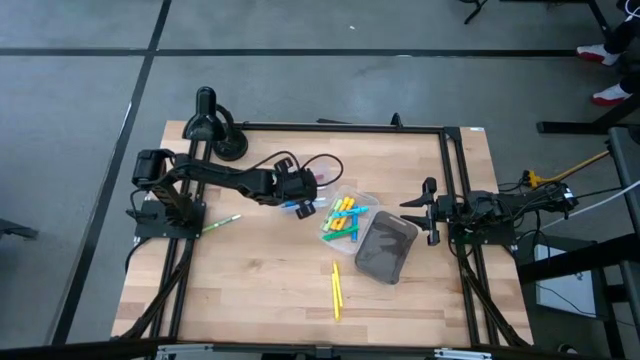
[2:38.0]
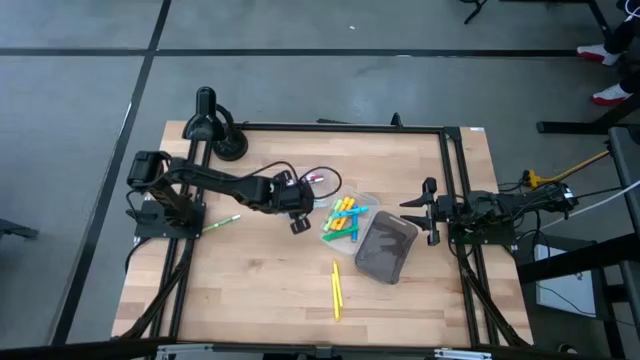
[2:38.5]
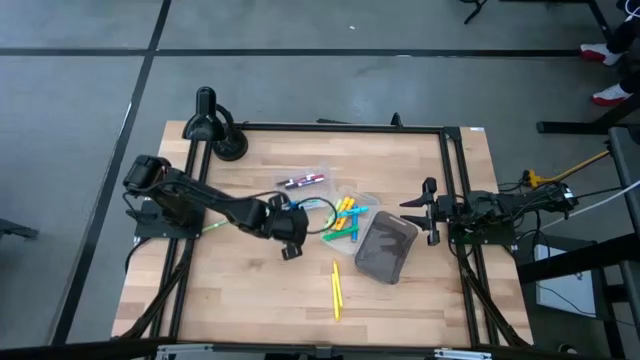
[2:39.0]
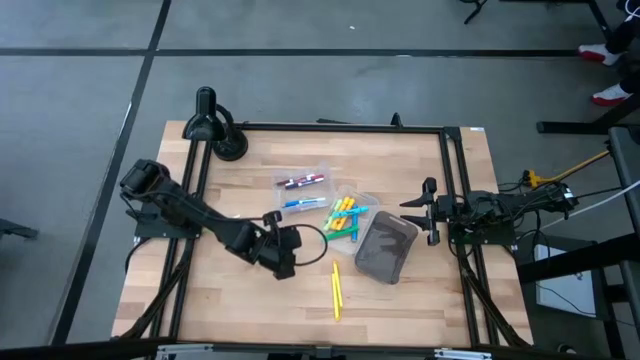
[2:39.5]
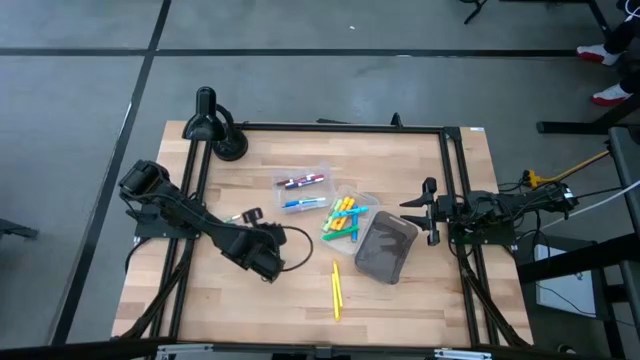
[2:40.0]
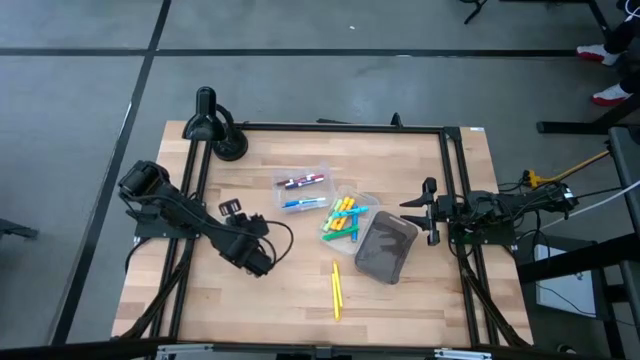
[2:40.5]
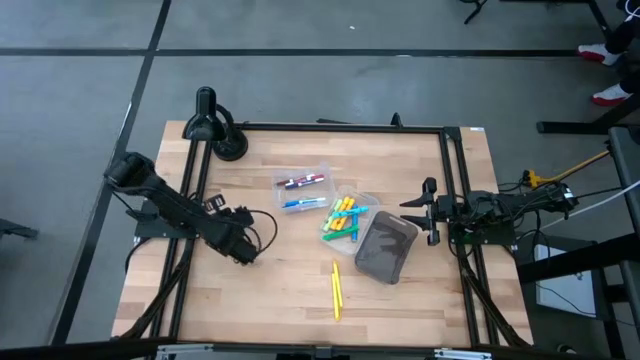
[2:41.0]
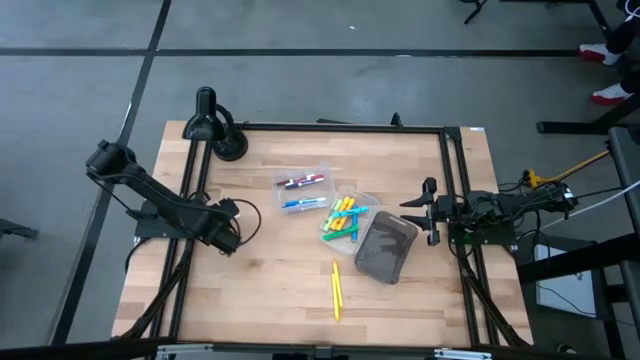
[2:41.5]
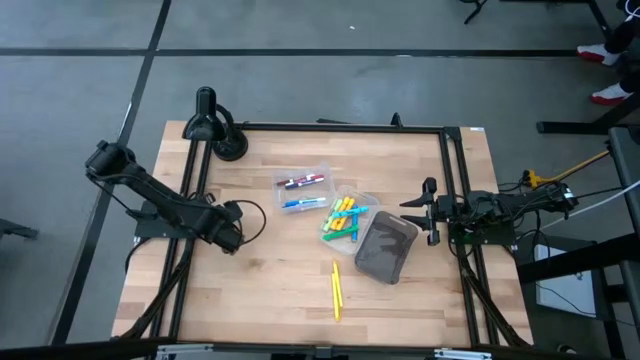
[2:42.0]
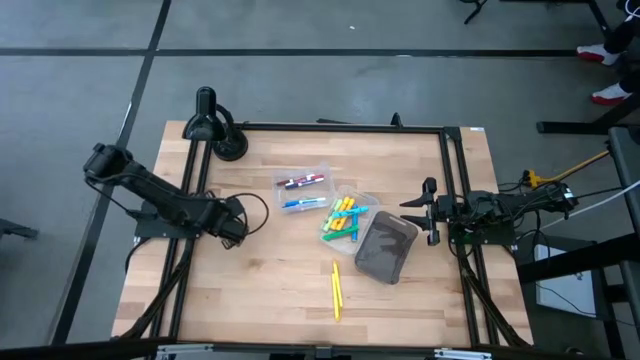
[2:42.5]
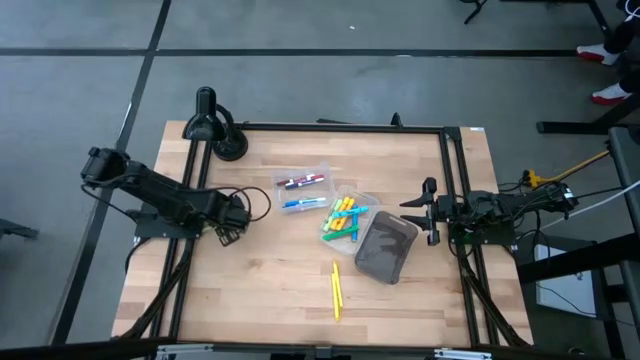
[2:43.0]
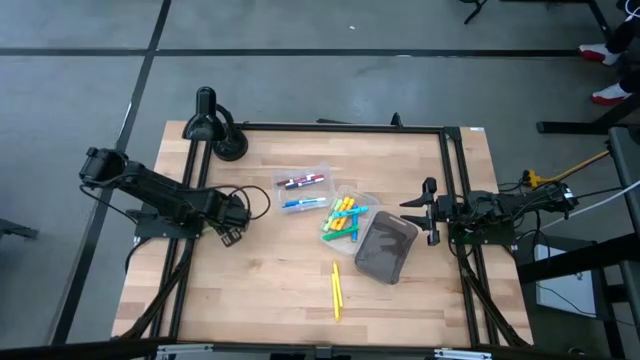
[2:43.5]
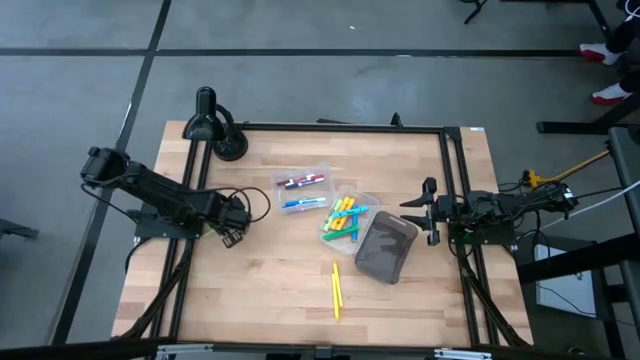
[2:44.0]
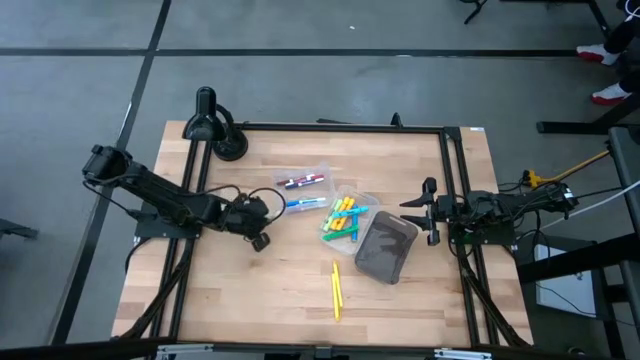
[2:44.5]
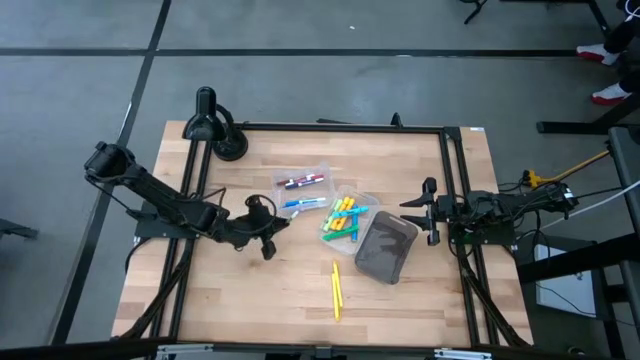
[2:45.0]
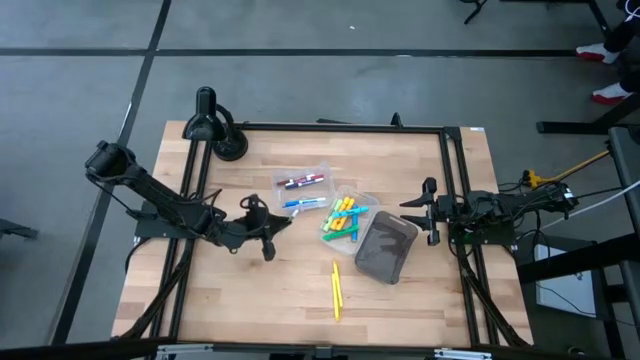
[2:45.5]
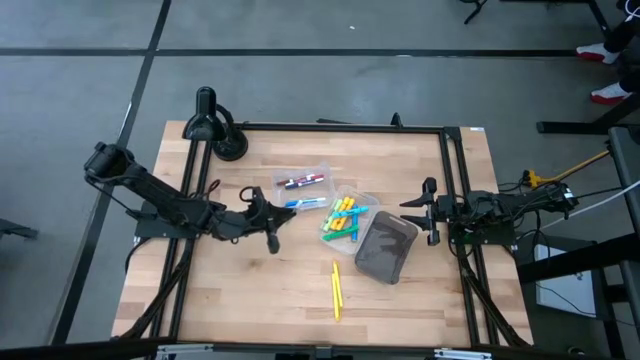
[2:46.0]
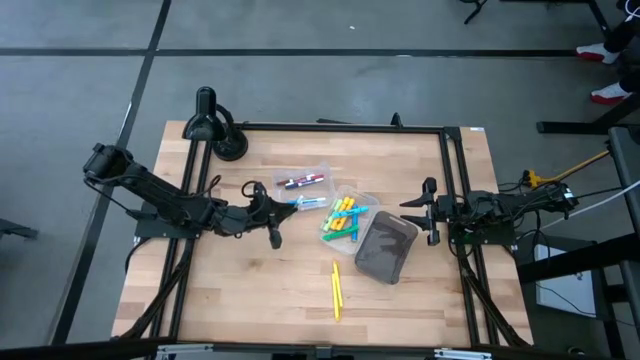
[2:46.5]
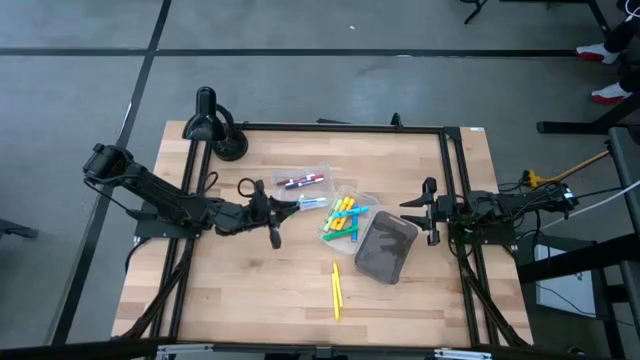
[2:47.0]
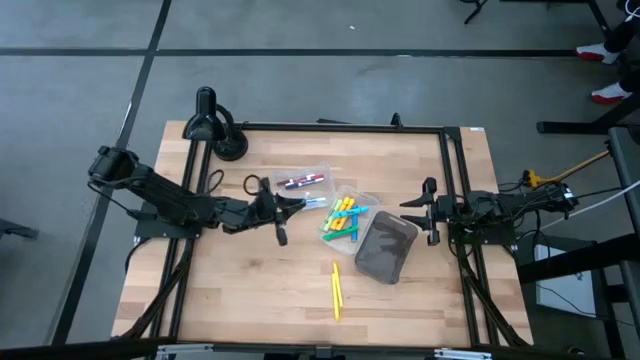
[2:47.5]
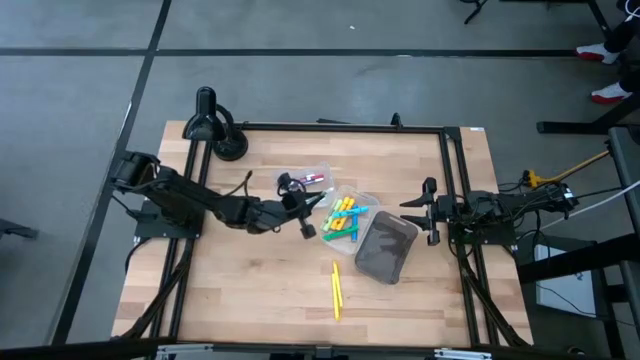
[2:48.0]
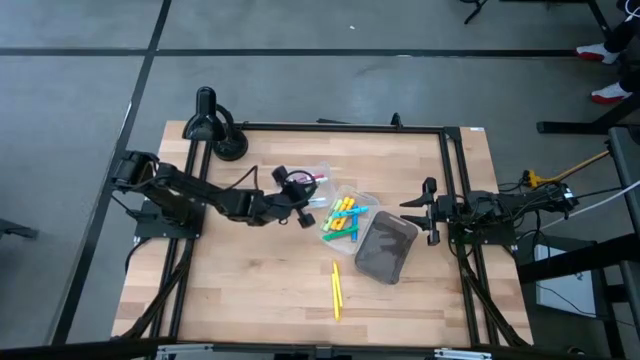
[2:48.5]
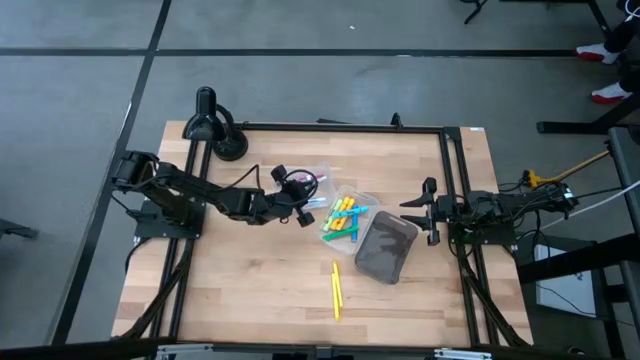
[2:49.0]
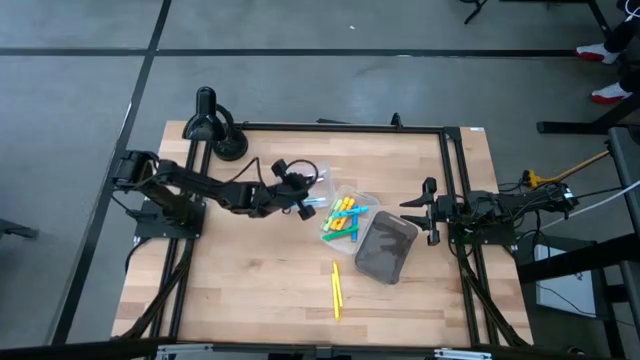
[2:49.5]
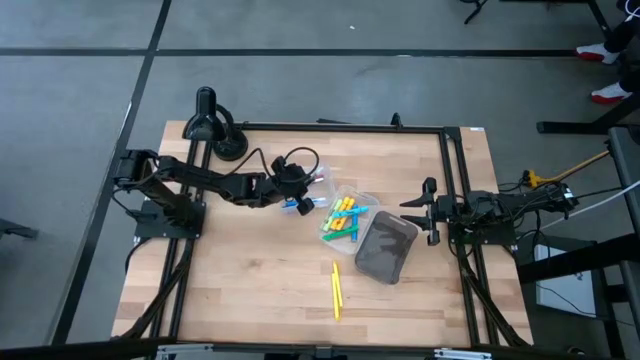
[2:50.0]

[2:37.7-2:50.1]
Task: Pick & Place Markers
Put the light green marker pen into the left transparent bin

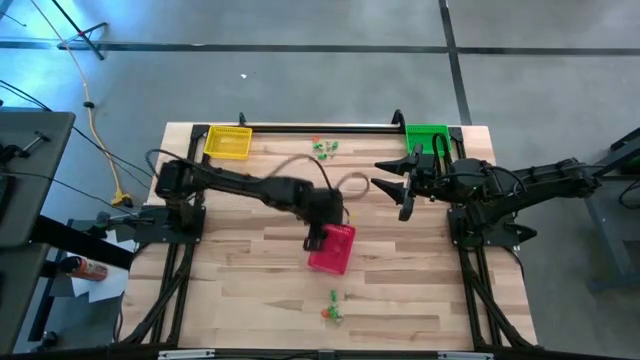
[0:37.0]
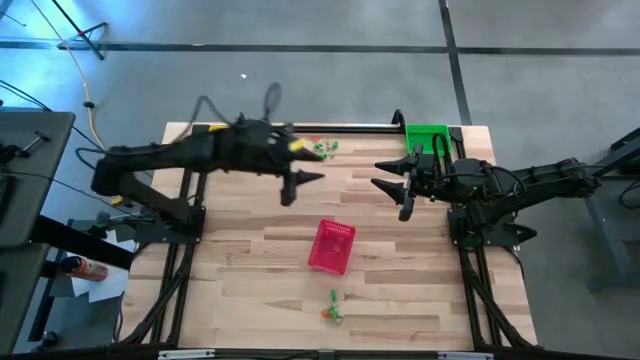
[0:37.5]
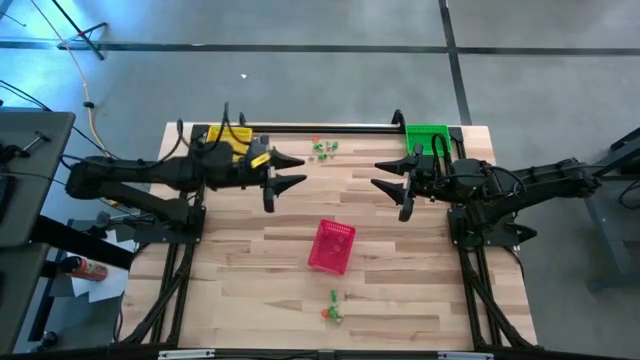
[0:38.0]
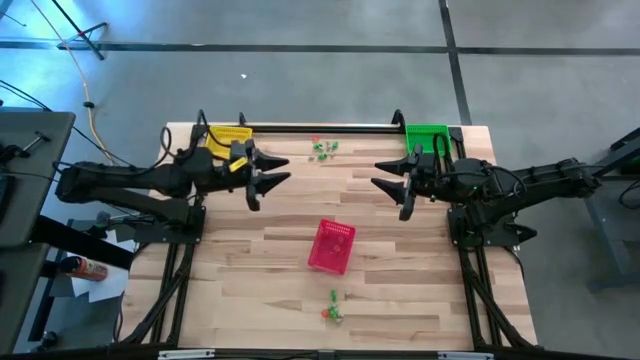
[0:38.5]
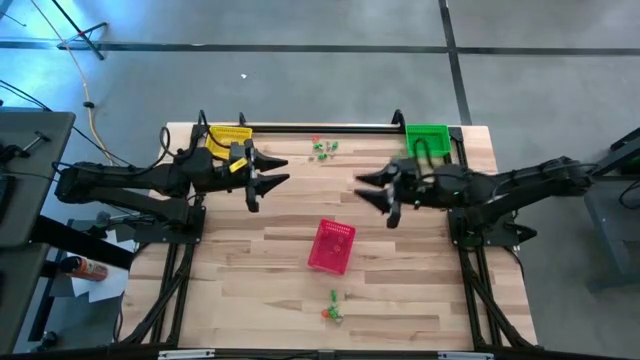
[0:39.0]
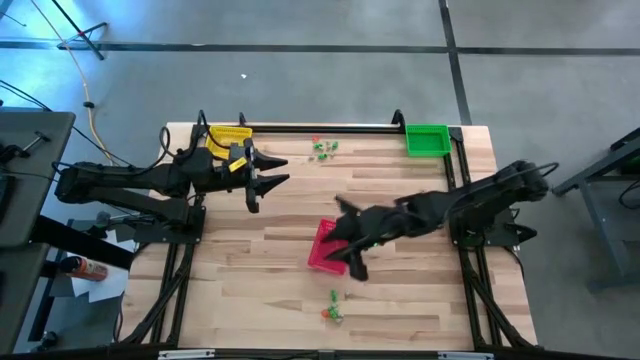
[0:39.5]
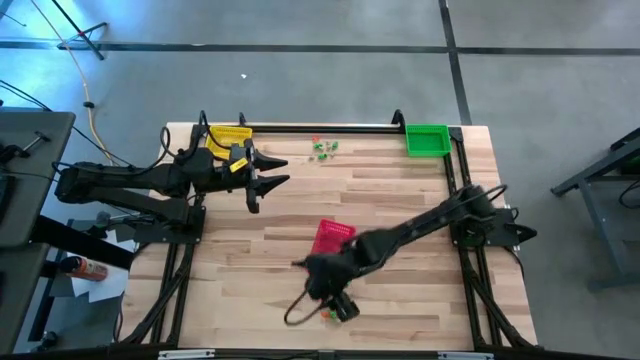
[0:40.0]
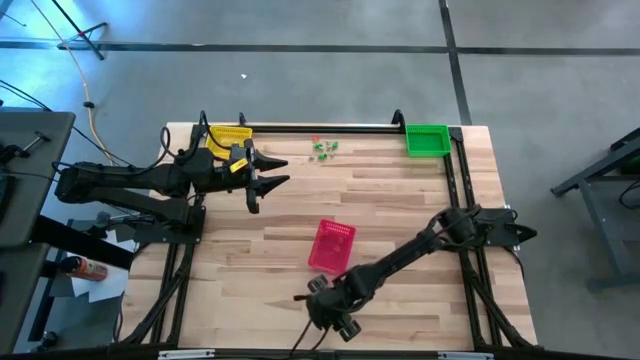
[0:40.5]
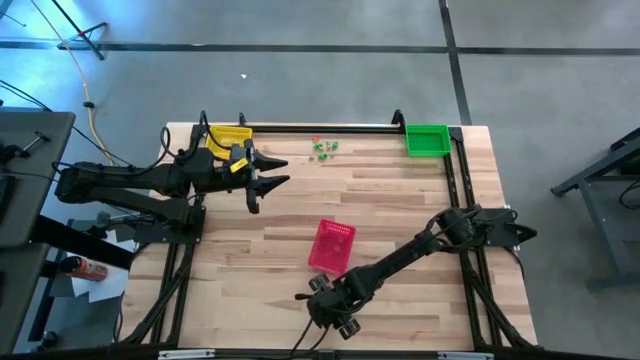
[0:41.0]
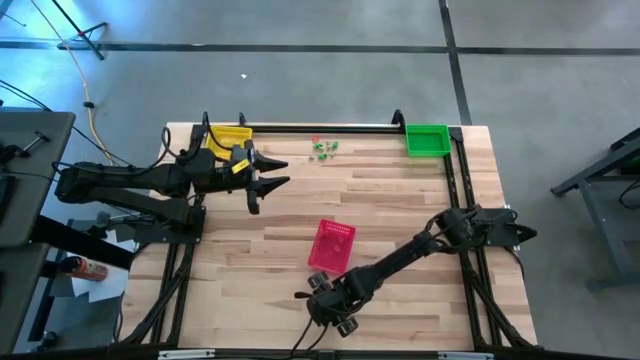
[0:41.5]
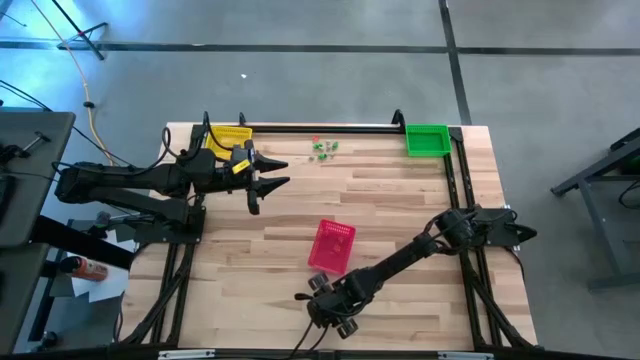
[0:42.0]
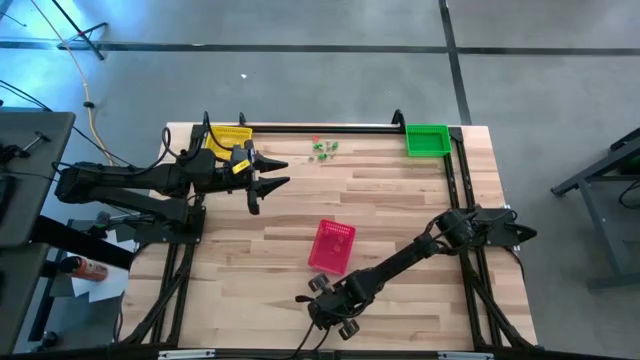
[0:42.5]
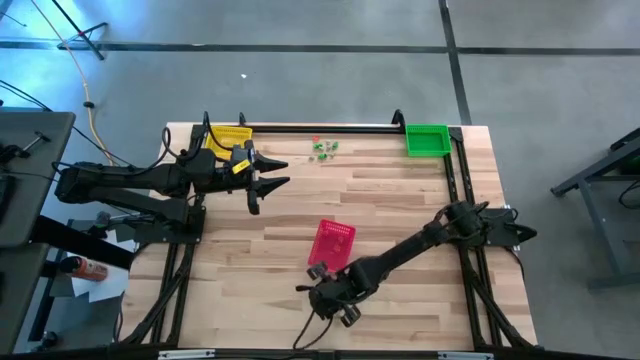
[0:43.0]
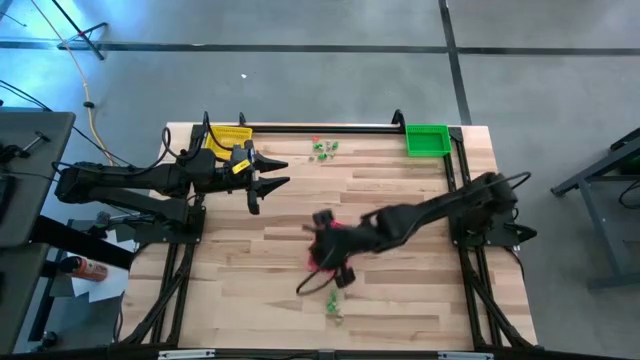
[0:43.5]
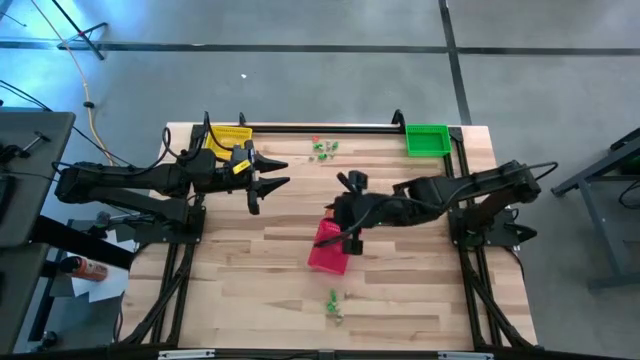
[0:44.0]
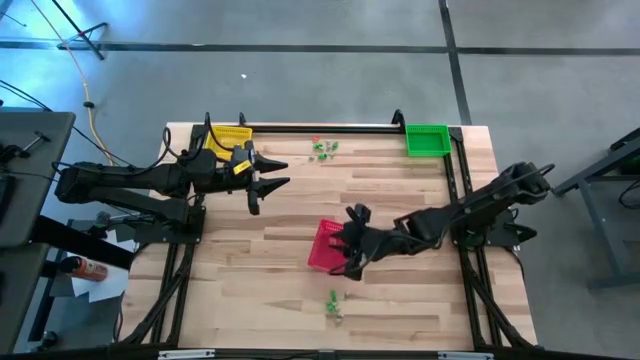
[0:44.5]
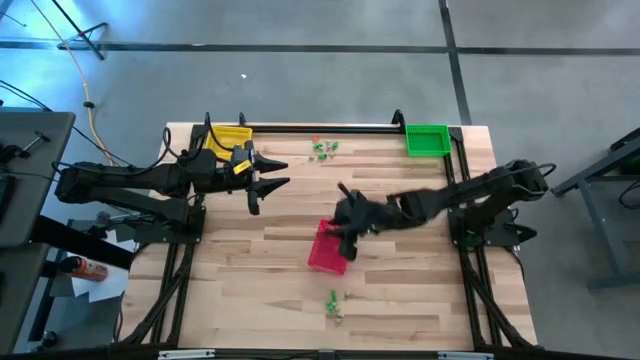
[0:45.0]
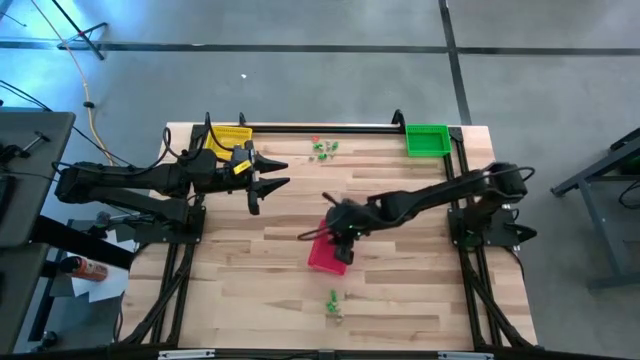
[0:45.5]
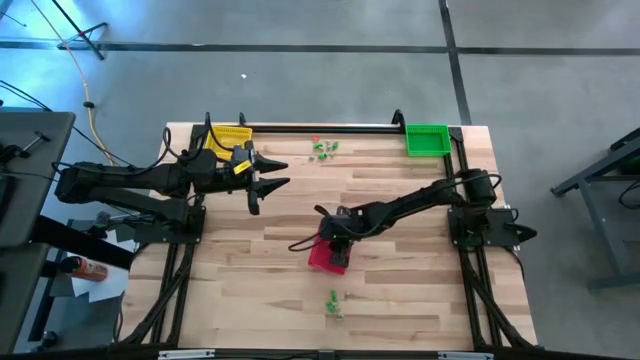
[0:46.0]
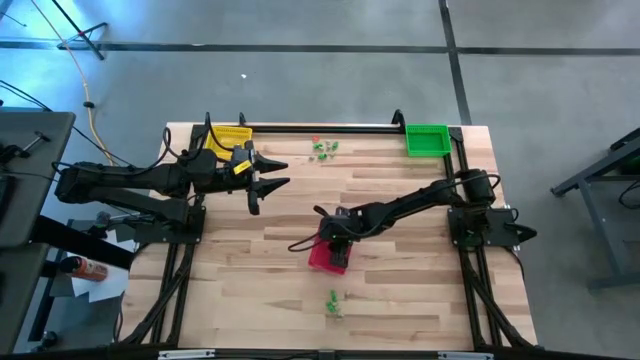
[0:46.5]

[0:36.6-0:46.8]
Task: Sort Halloween decoration
Put the orange pumpkin toy into the red bin
